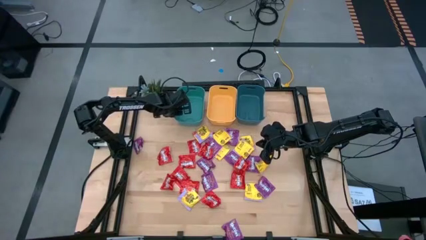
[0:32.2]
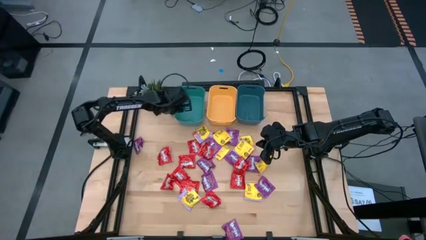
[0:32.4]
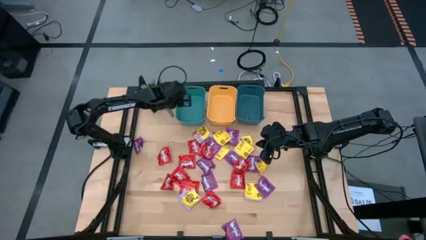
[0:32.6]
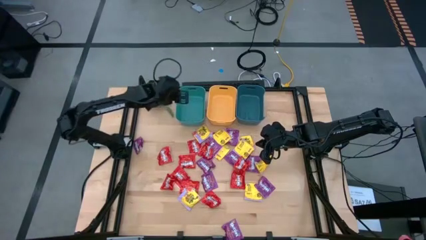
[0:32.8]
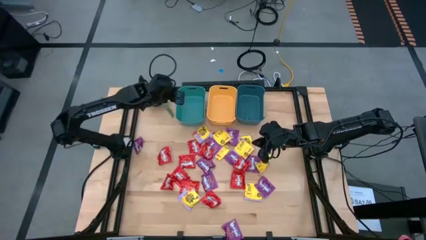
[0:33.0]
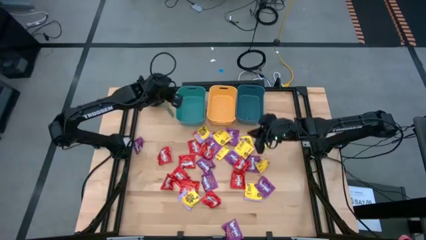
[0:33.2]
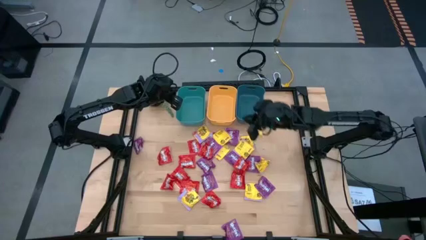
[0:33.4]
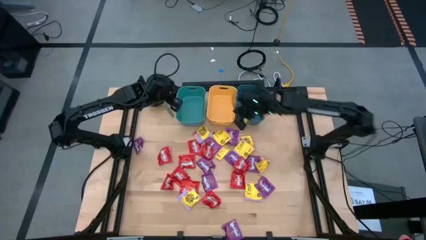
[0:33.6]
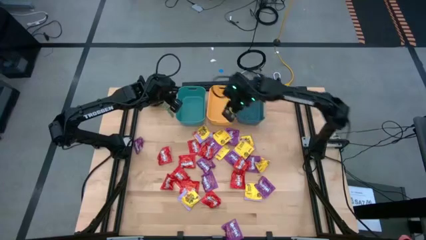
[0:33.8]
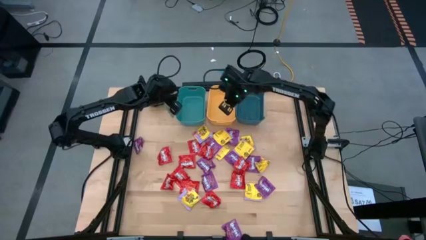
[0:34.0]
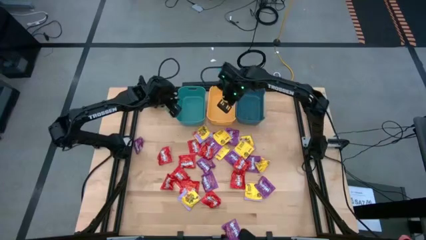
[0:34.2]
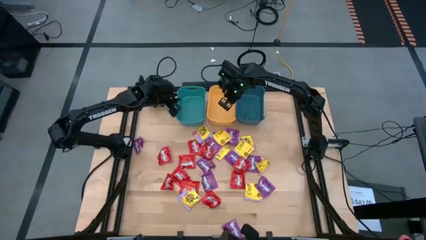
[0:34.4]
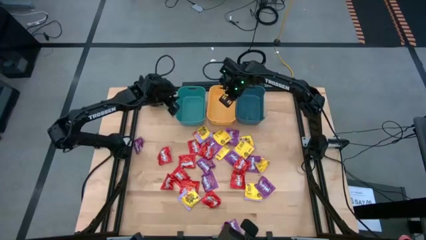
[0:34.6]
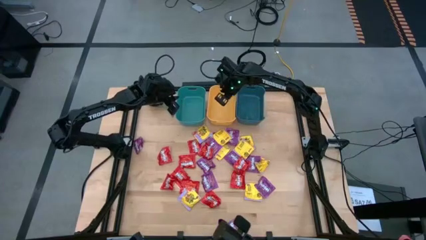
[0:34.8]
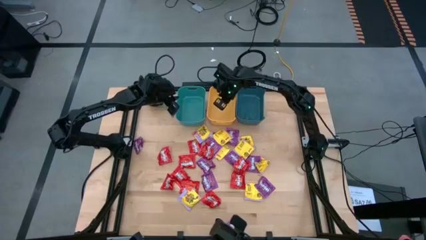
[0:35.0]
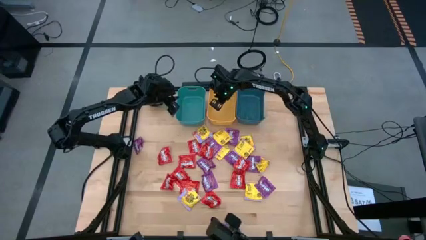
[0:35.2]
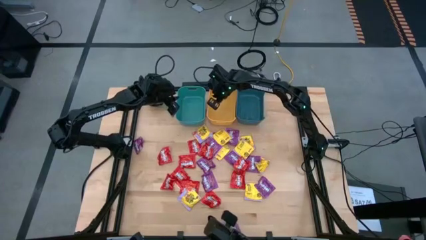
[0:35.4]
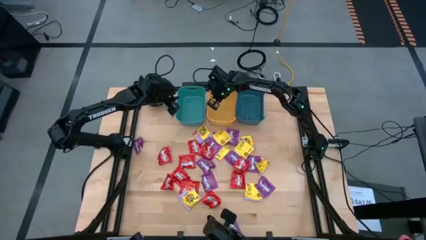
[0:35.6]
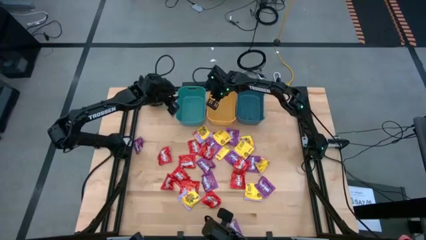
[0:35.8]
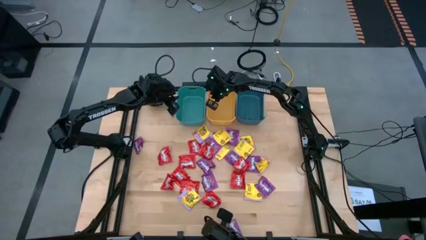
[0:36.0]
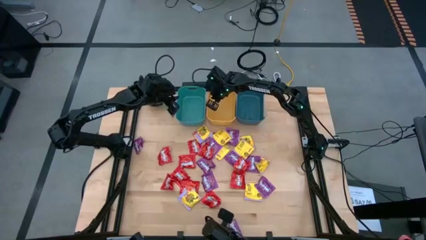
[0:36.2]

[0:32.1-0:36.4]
Task: Sort candy
Adjust the yellow bin

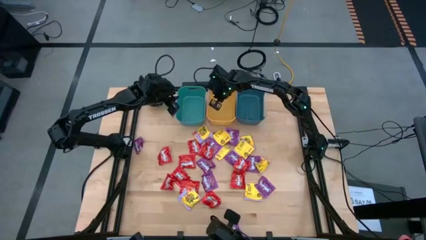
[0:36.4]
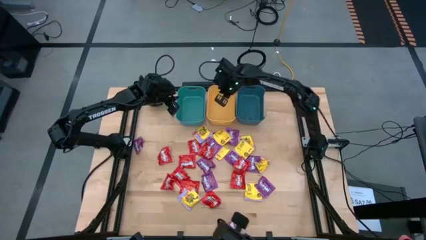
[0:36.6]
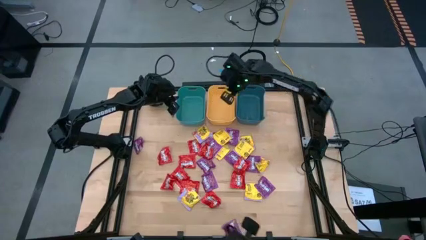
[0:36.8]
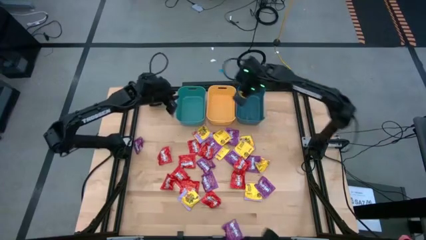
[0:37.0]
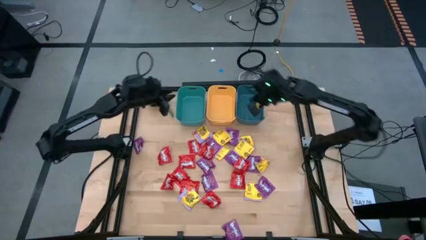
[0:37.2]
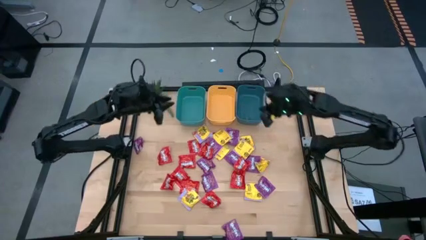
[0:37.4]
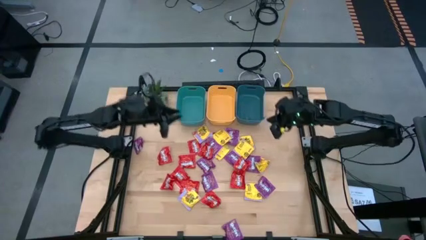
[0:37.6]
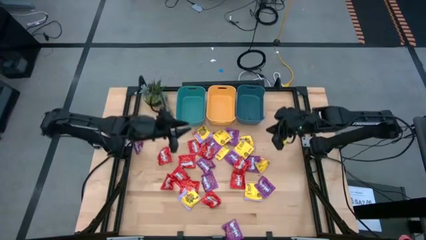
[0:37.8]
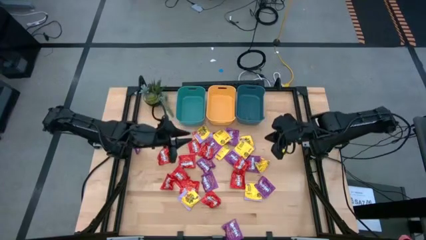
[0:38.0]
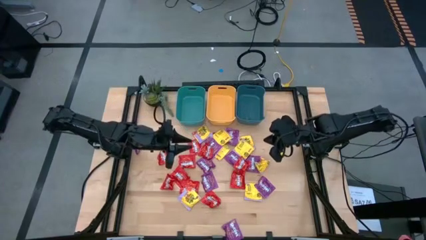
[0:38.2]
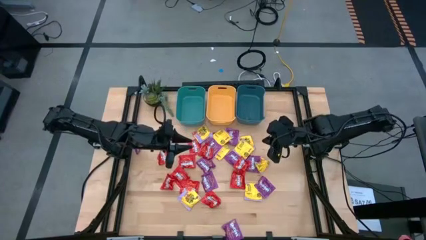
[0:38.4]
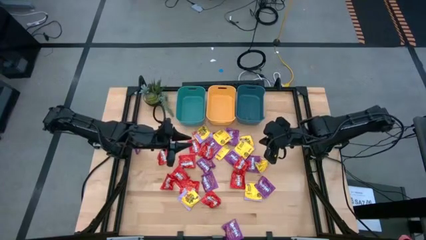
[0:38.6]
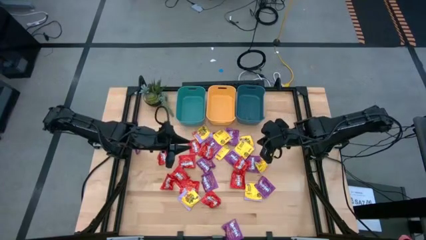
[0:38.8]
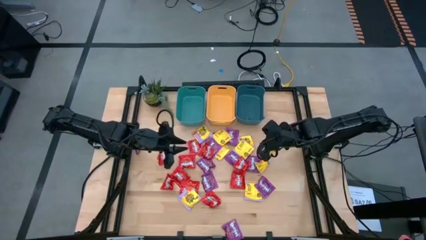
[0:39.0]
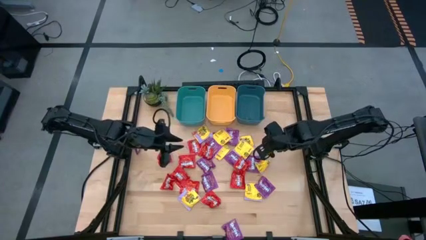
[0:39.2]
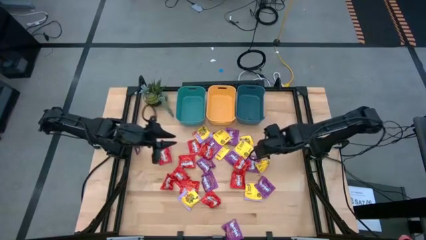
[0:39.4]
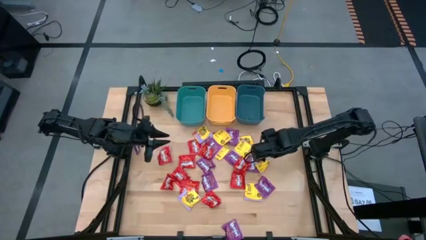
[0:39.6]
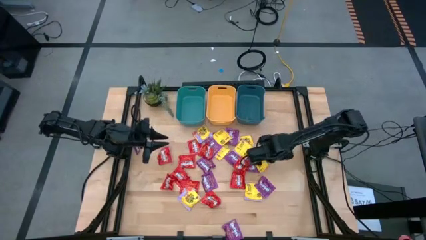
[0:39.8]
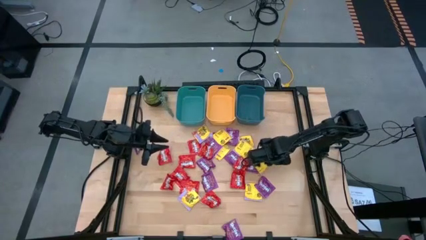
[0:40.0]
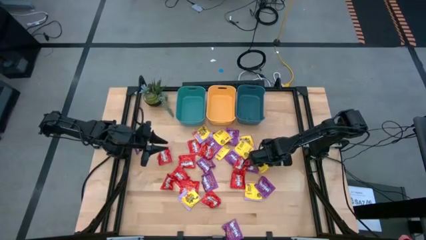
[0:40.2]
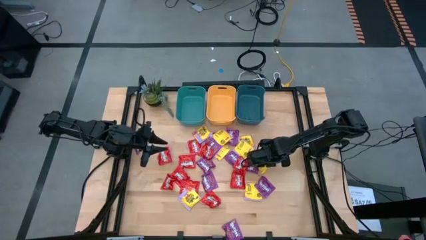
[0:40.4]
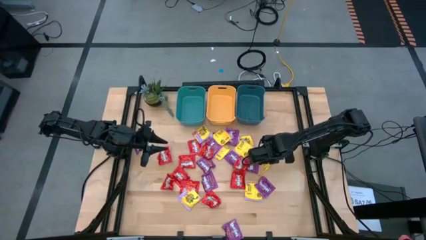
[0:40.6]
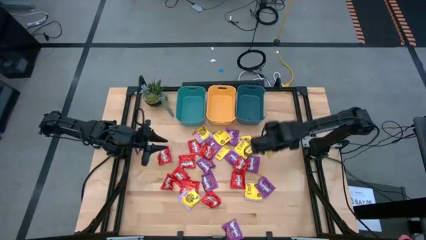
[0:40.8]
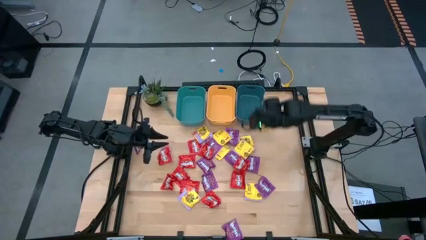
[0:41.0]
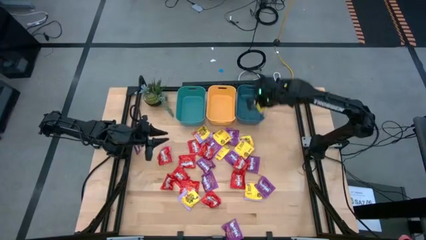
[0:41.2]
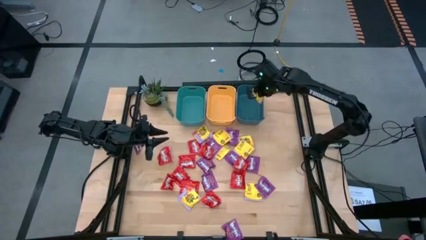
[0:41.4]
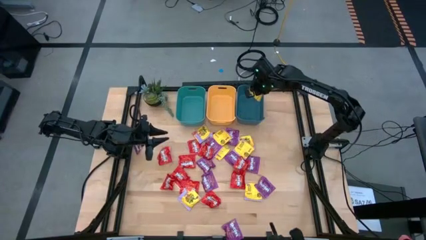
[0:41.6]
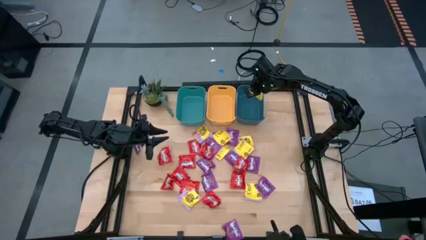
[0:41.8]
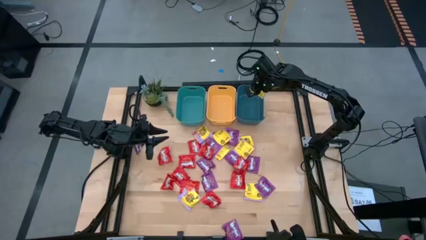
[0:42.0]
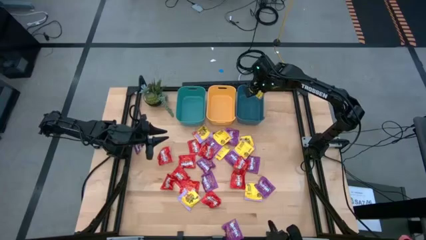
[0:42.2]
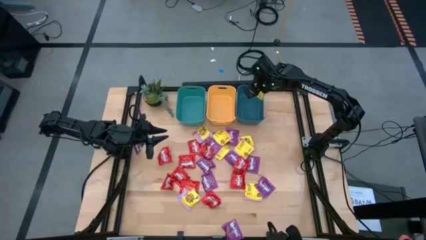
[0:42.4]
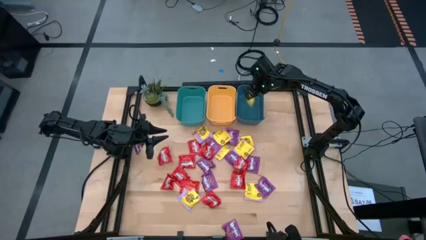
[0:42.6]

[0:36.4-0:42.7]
Put the yellow candy into the dark blue bin

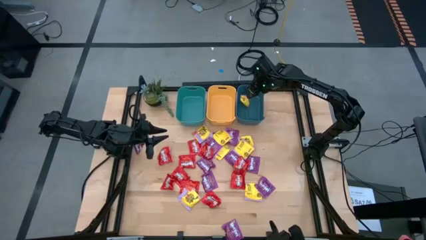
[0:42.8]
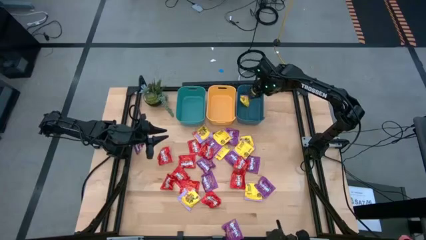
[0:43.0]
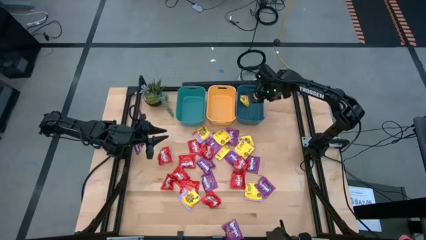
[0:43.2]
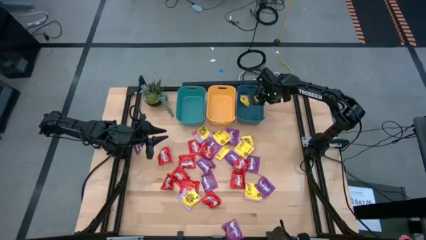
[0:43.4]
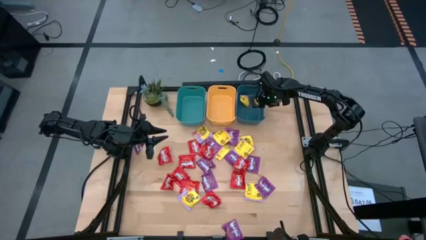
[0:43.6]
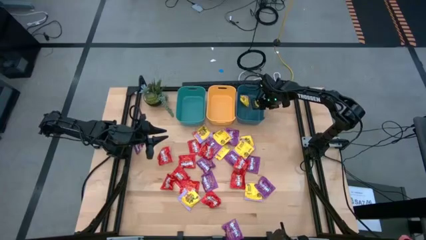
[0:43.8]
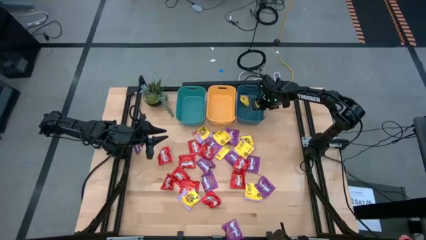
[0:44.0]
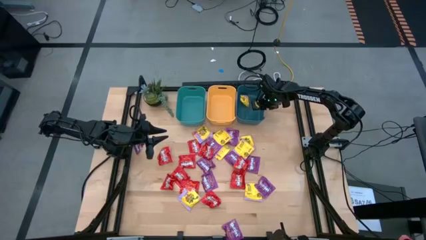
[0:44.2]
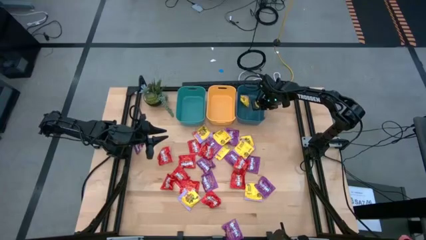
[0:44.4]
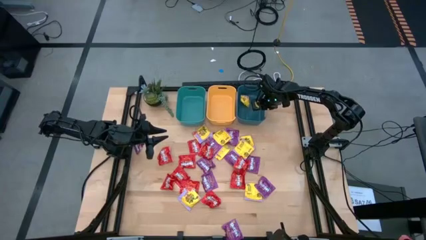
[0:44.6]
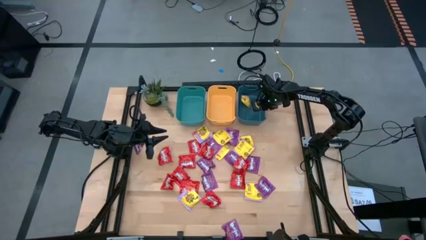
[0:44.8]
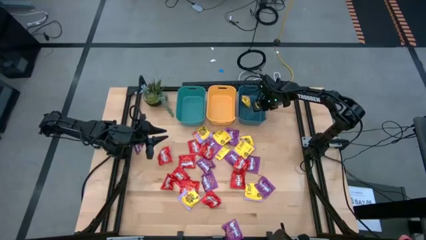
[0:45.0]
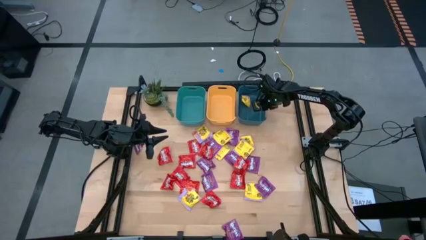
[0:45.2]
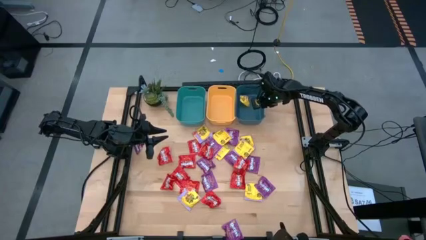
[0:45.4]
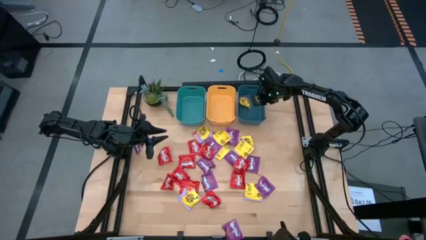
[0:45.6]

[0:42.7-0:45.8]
Adjust the dark blue bin

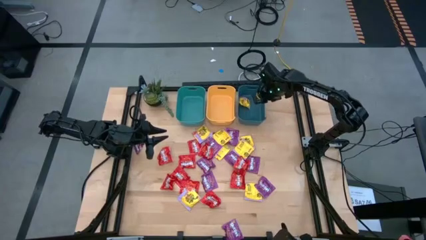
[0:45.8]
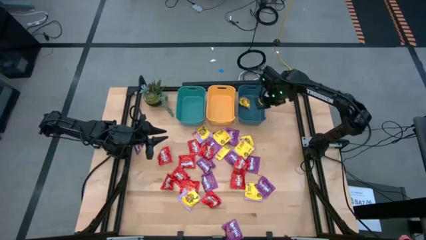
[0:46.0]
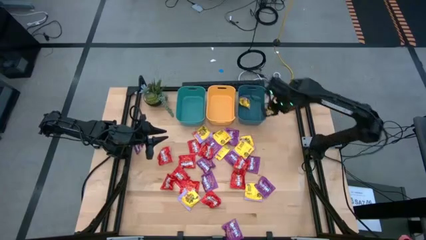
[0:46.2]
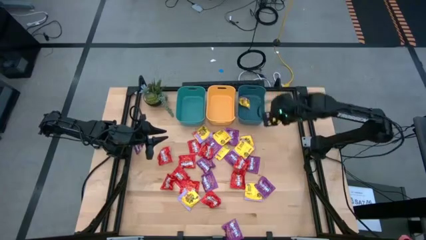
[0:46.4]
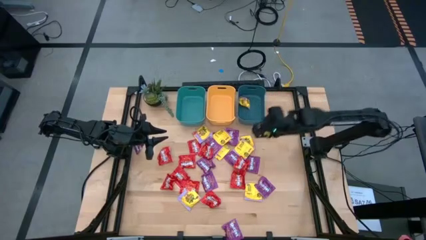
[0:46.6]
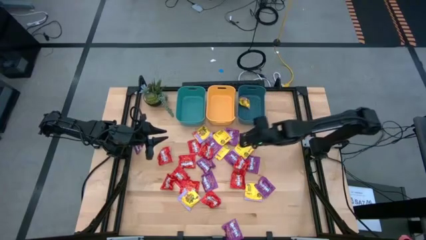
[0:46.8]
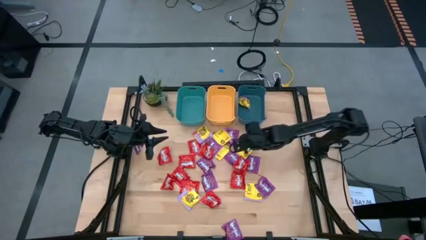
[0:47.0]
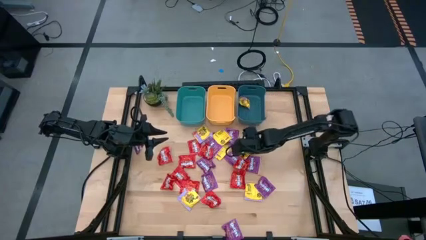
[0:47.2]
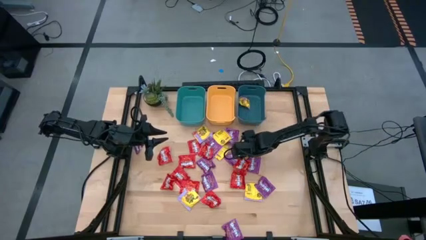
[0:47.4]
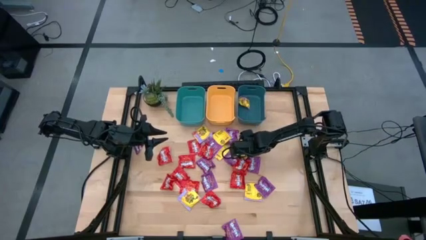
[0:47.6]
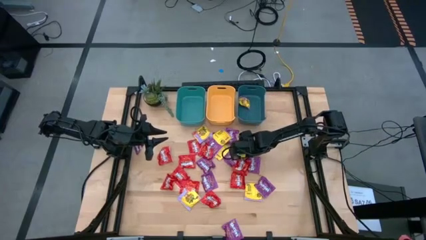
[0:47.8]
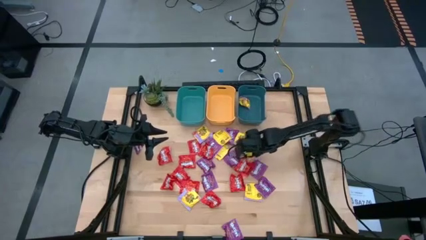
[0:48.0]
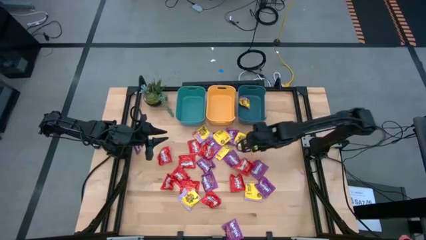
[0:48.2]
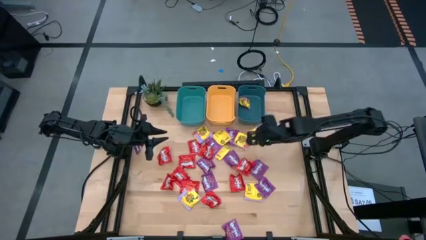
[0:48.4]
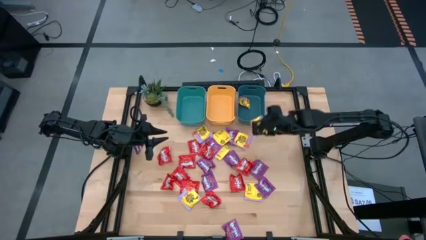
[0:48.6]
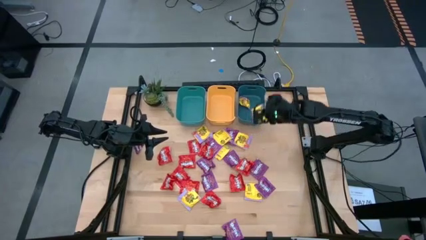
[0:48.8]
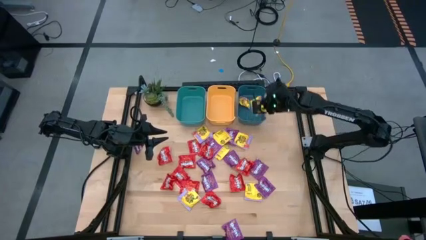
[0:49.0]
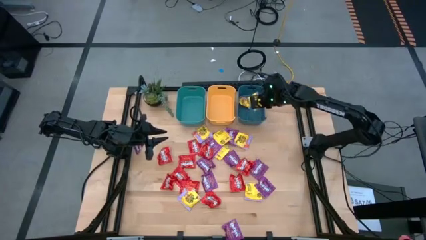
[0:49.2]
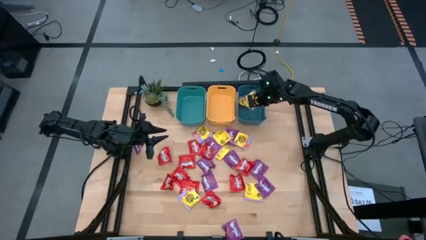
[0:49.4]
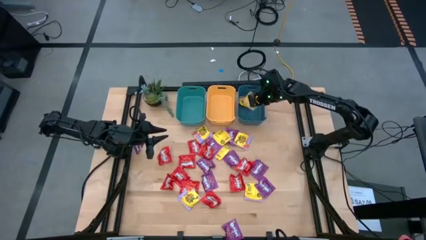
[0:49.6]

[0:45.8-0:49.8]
Put the yellow candy into the dark blue bin
